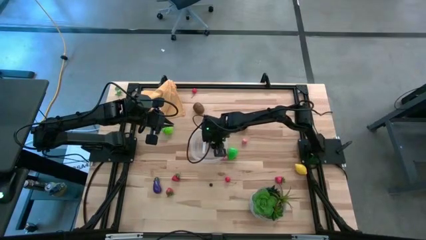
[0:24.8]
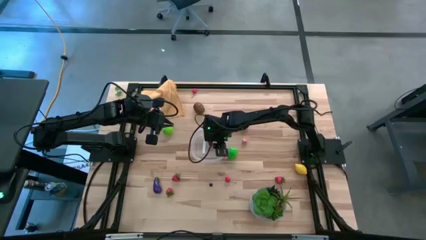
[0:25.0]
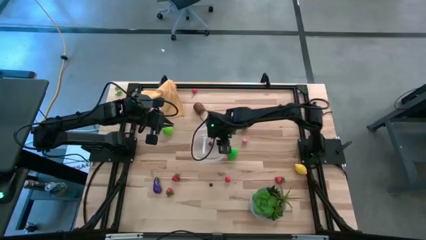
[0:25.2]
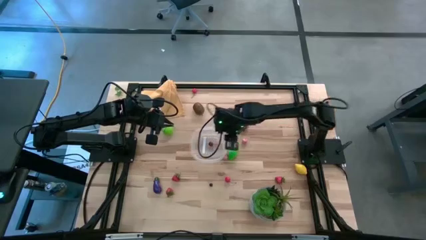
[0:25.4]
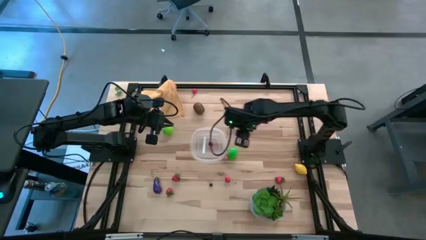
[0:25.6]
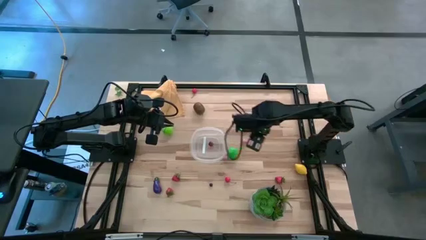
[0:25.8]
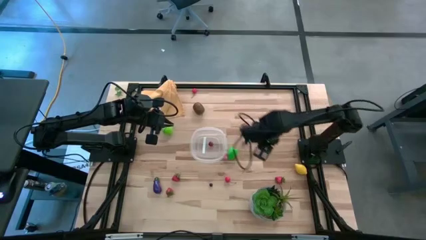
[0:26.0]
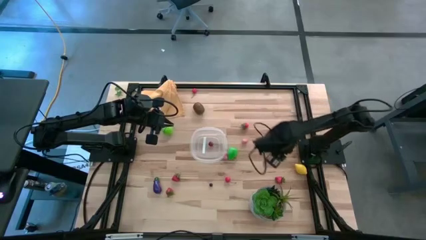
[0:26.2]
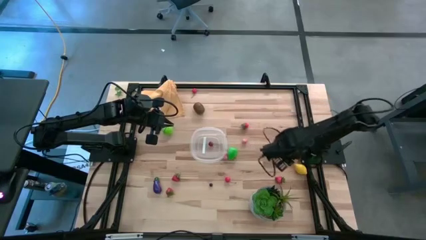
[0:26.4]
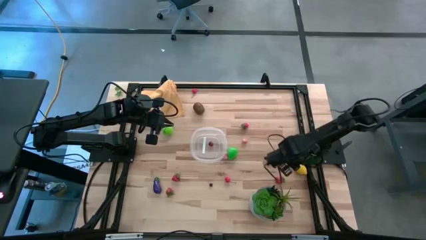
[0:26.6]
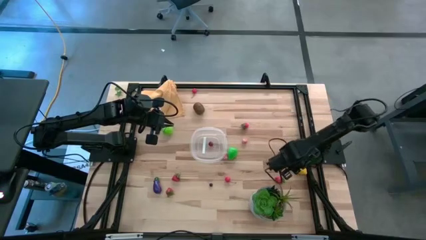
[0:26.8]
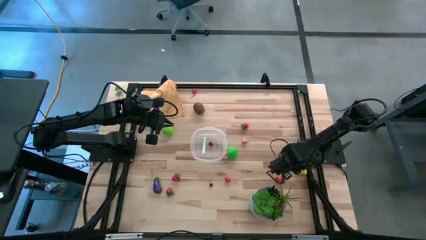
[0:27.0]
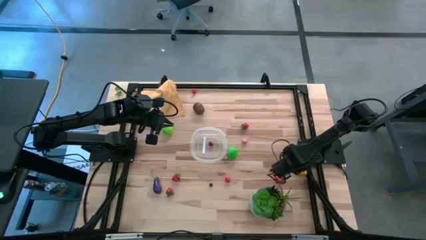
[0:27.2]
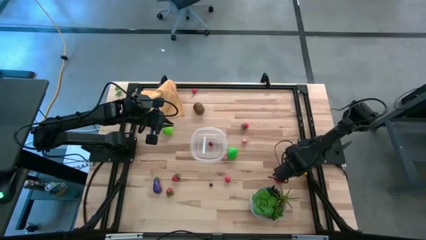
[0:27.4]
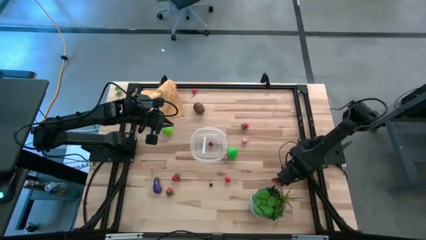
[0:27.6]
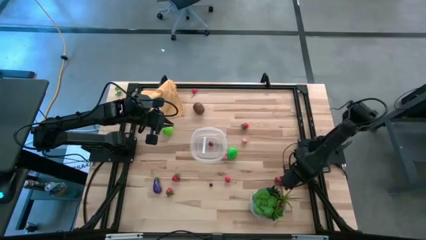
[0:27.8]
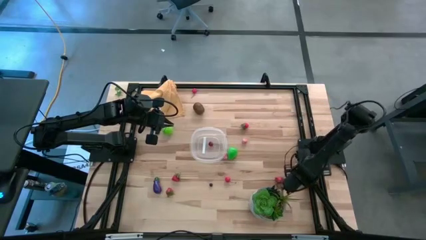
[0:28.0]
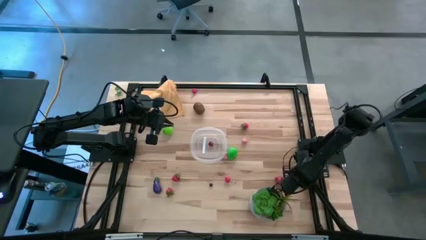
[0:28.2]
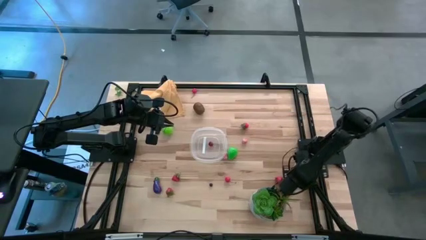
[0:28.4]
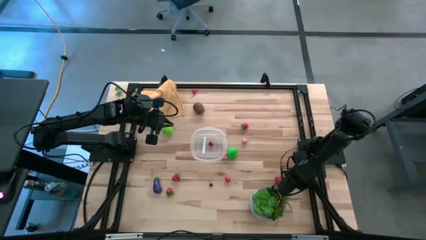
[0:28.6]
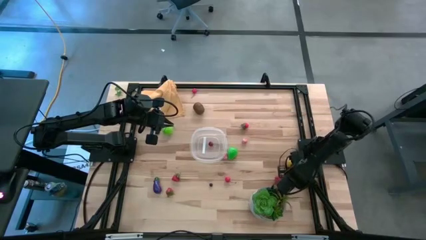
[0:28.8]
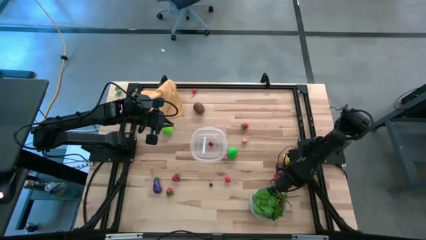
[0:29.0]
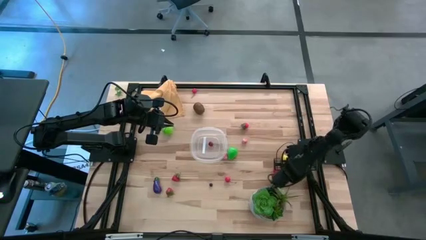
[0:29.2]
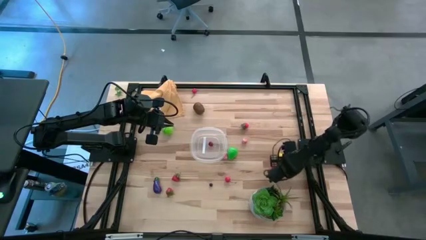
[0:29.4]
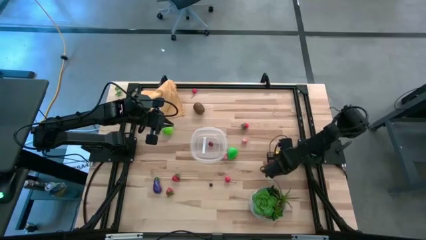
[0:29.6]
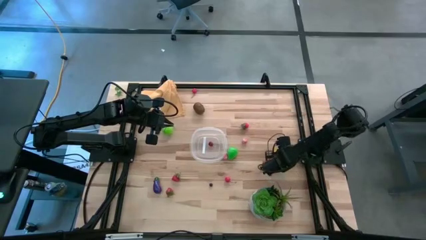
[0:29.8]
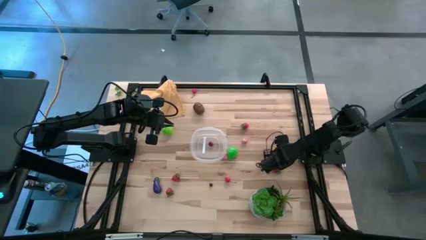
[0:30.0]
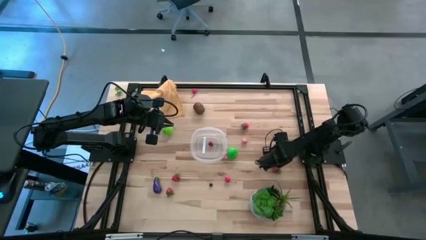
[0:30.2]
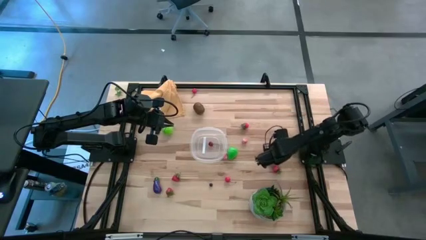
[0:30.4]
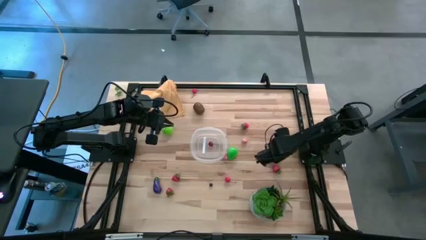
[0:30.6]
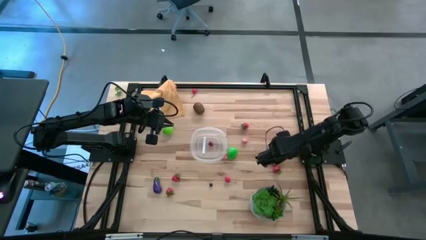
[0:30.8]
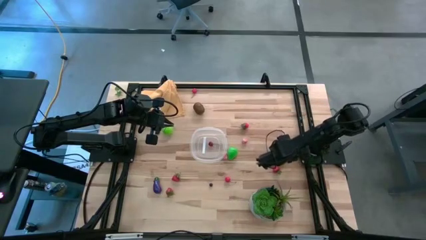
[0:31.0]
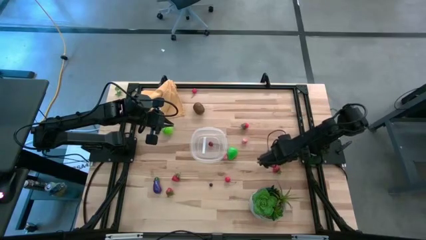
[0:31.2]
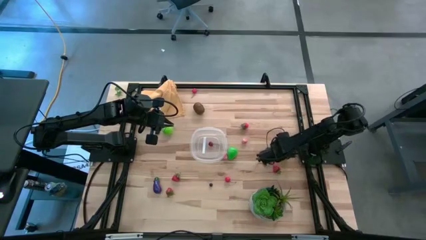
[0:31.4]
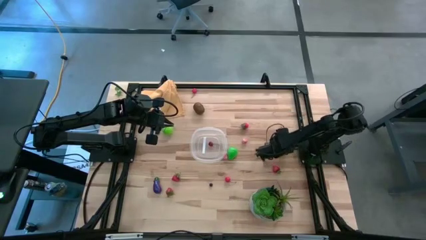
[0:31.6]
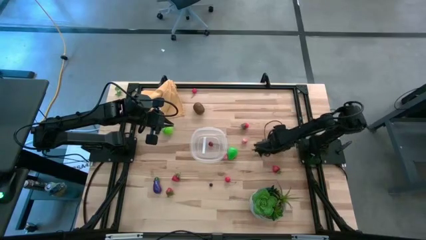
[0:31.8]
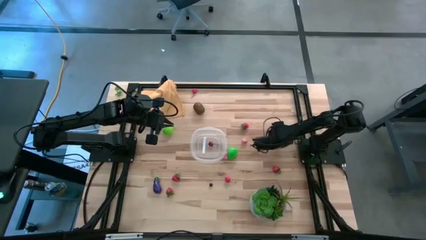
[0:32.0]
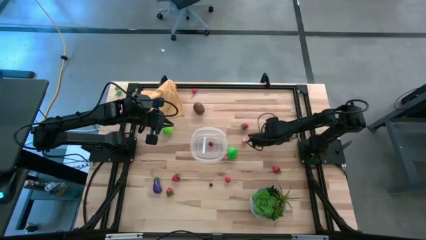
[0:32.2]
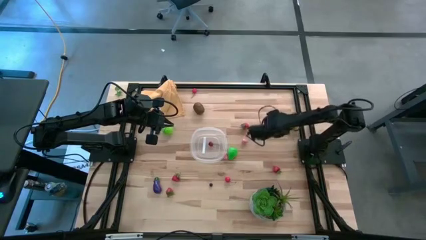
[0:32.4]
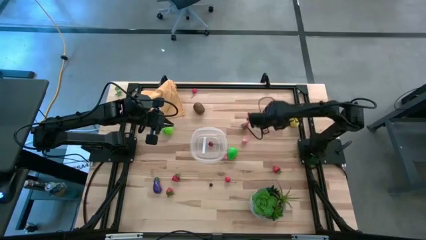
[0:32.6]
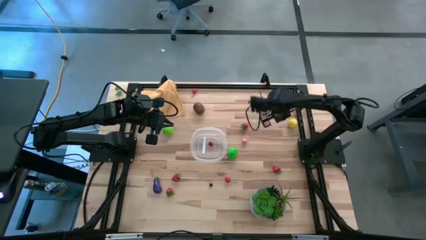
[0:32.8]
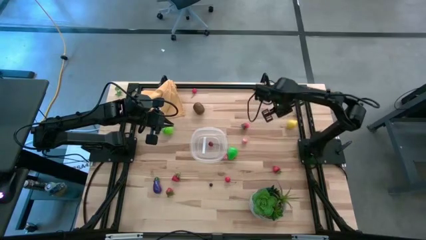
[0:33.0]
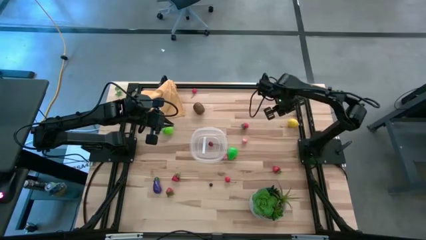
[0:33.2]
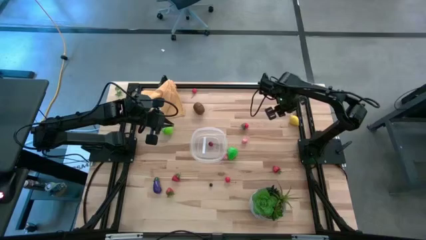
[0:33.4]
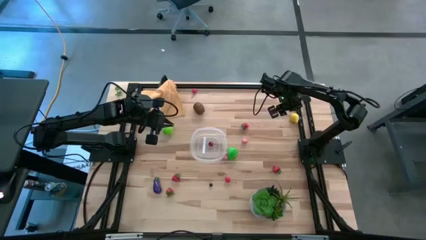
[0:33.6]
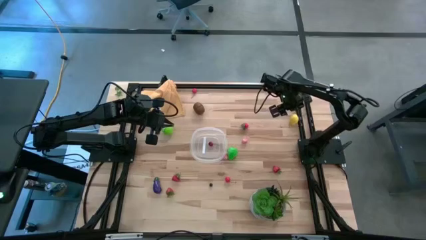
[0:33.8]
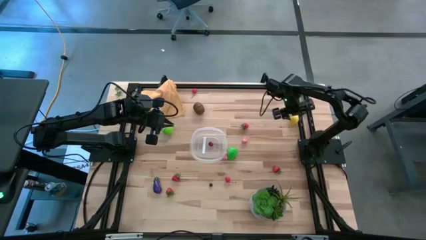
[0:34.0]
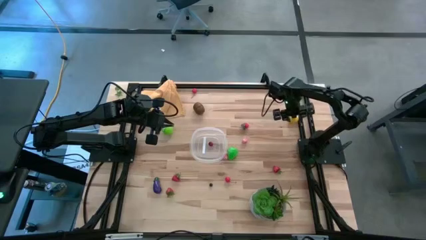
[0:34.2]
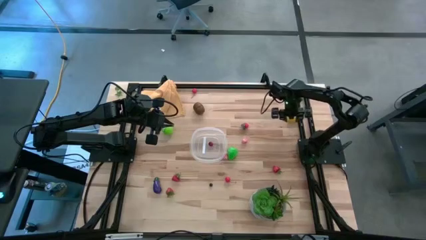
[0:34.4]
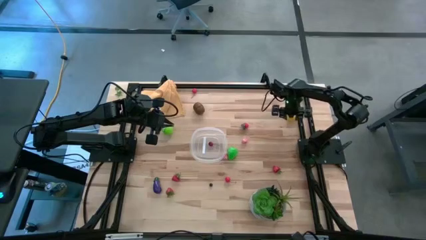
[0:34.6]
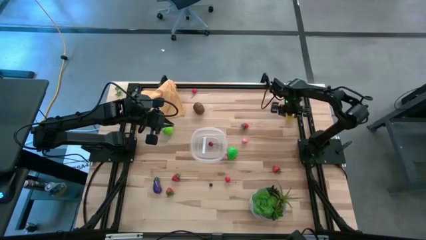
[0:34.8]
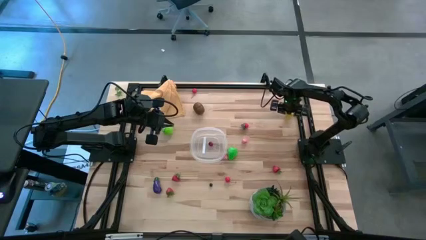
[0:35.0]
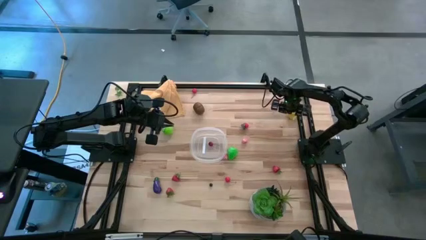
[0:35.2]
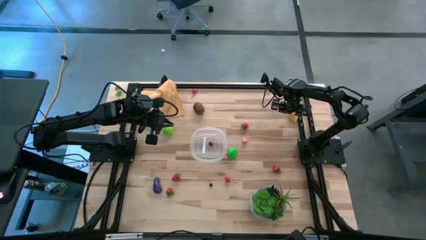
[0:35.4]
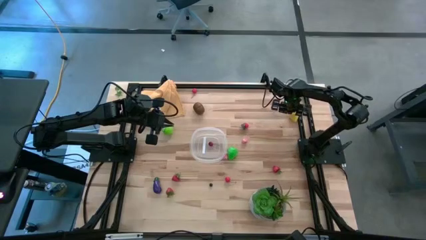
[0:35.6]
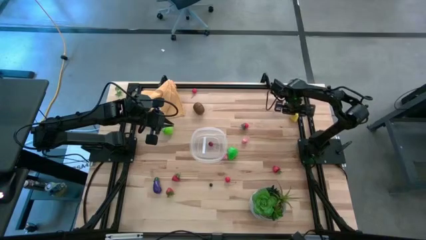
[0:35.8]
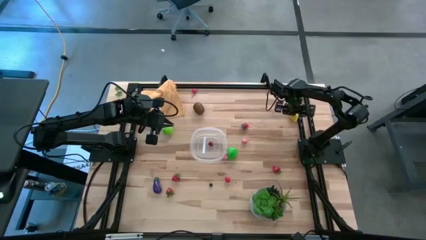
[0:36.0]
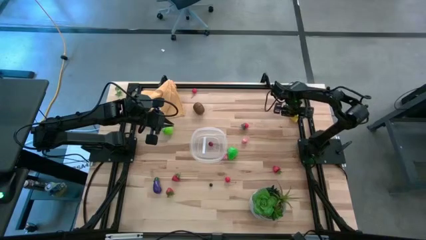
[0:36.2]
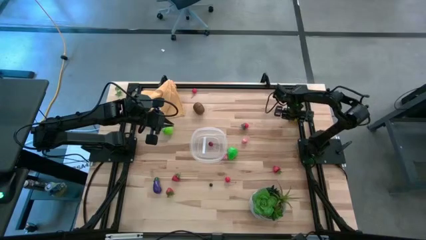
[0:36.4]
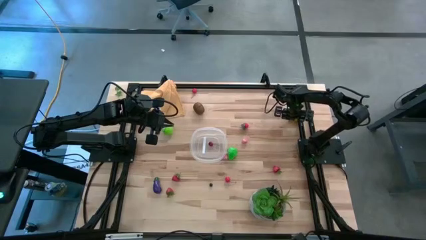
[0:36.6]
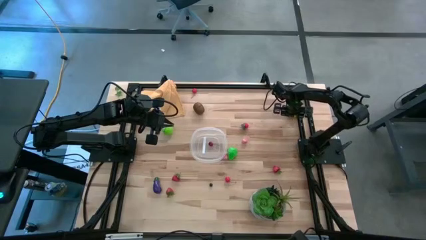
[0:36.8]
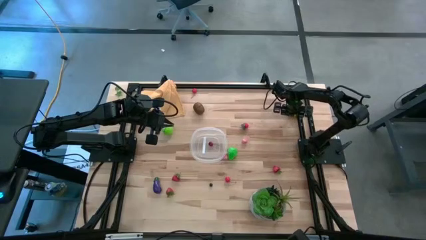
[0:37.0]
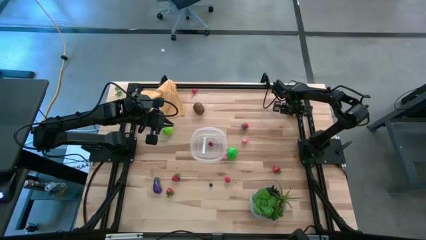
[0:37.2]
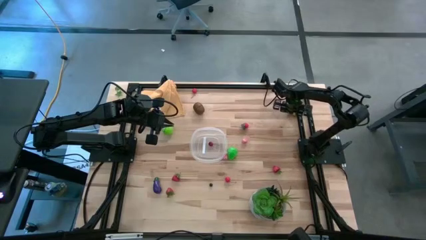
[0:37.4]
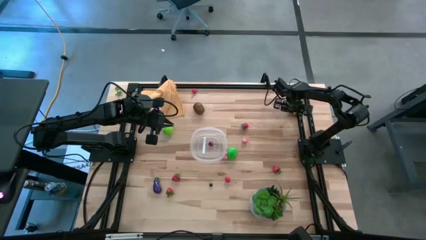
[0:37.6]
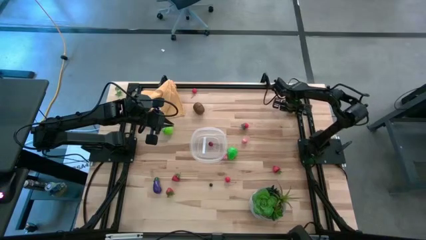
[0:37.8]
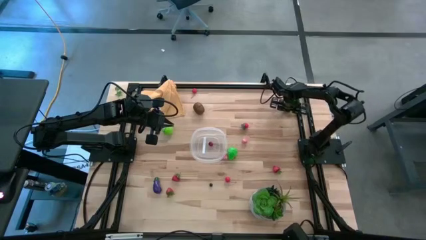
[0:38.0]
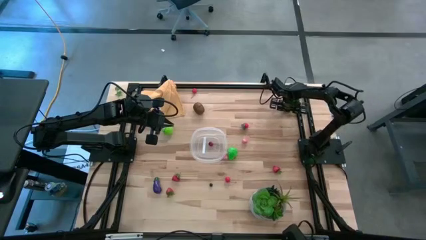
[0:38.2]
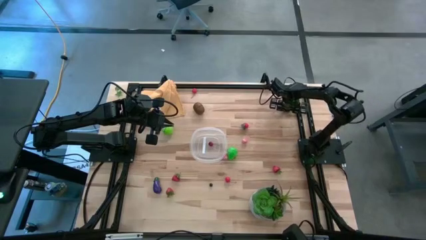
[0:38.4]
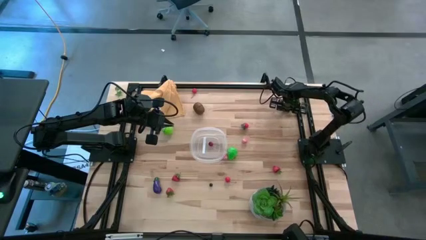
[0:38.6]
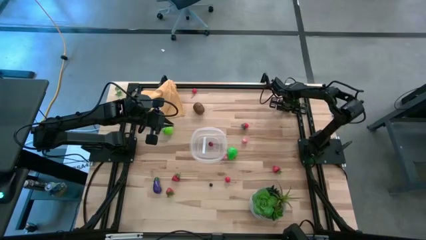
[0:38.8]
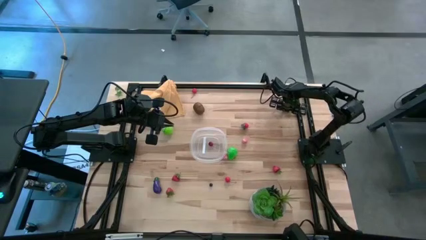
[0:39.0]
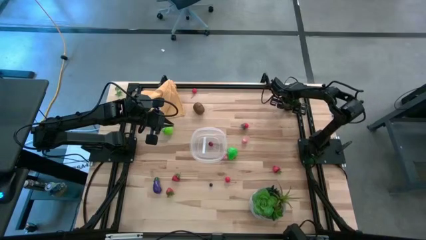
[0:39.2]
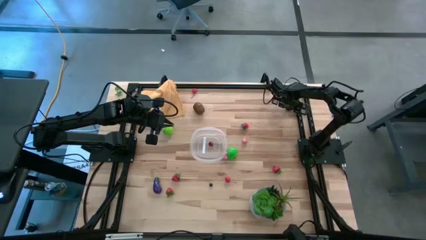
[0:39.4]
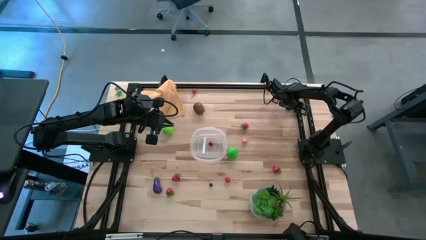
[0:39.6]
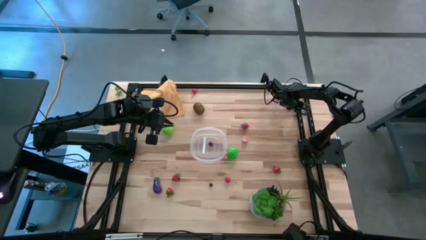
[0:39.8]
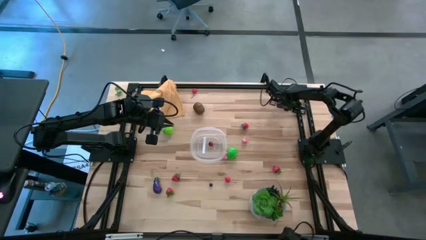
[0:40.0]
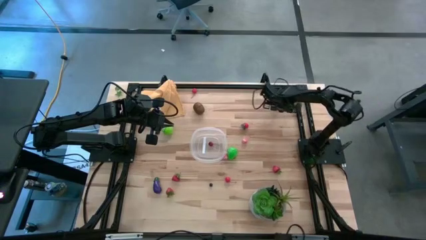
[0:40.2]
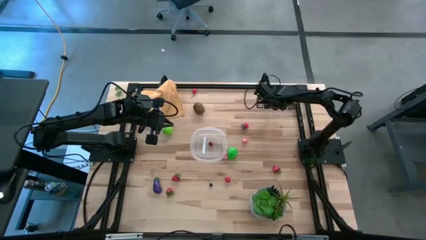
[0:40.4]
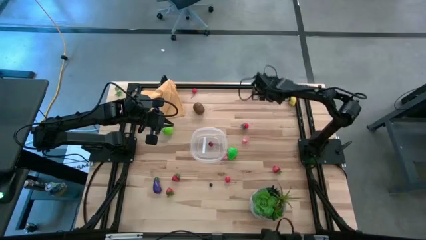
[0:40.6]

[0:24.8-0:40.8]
Task: Pick and placing Produce into tupperware
Put the lemon into the transparent bin

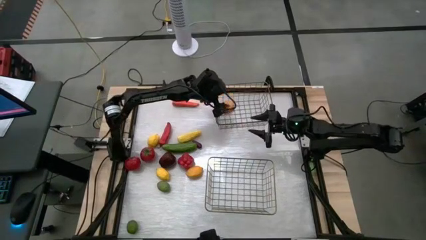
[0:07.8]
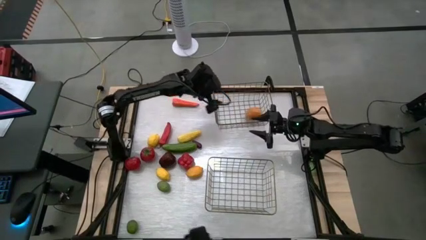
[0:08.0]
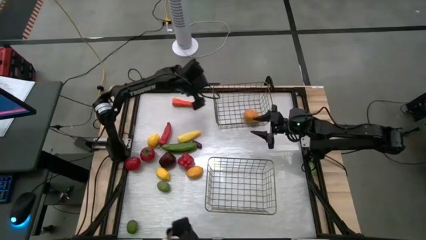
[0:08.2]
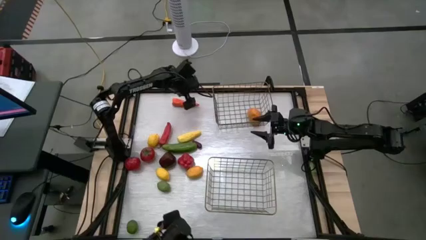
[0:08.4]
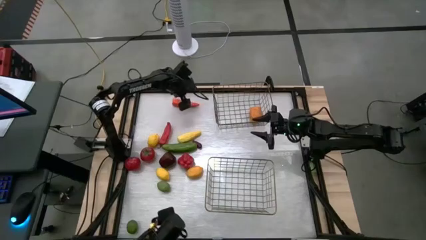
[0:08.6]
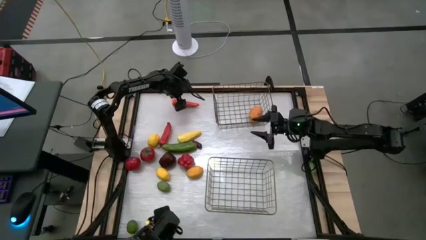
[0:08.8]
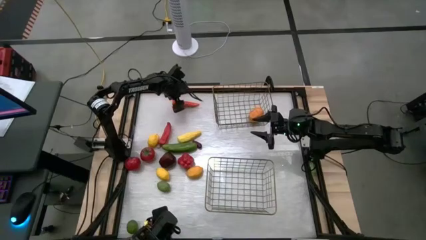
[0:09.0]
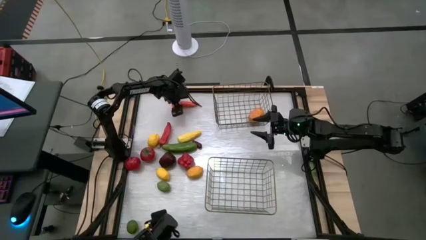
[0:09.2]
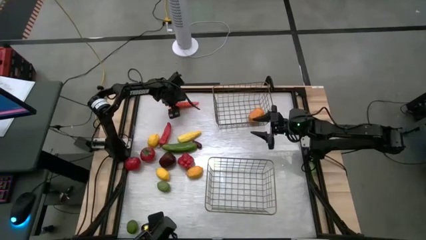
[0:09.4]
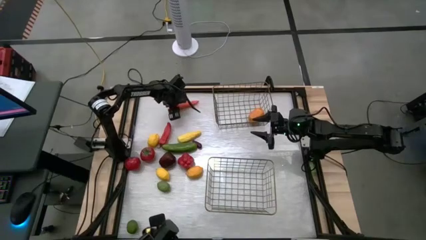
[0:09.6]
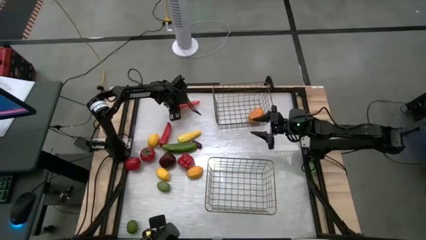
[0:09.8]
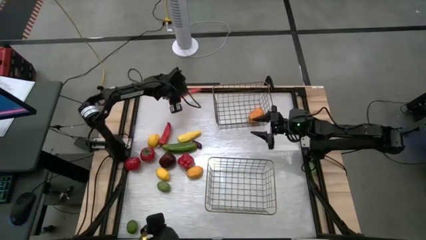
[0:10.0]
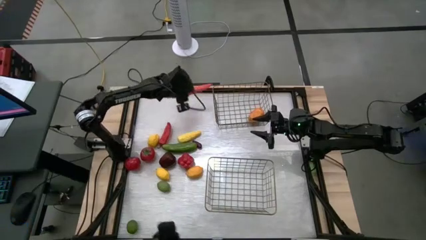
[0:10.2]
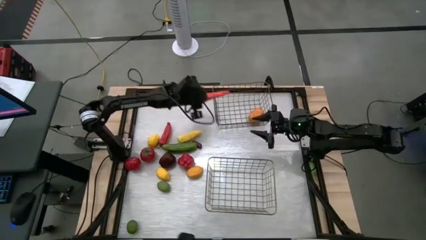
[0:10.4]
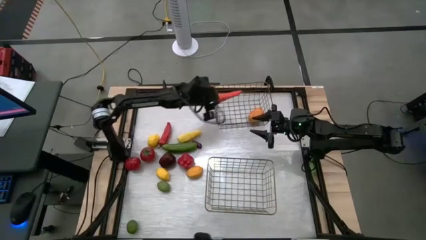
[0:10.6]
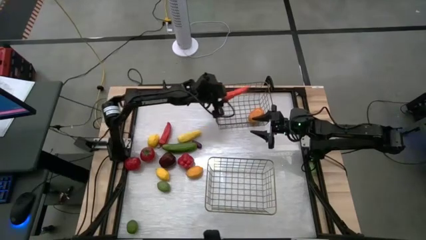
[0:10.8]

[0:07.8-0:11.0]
Task: Sort produce into baskets
Put the orange carrot into the top wire basket
